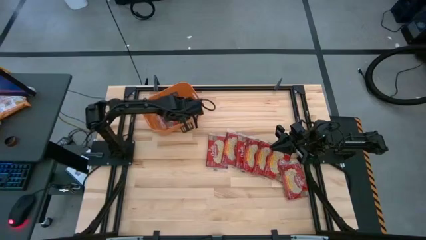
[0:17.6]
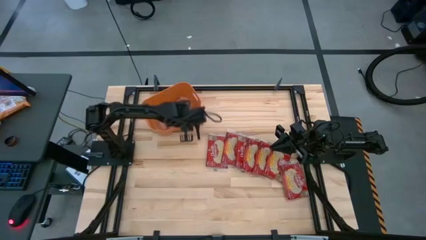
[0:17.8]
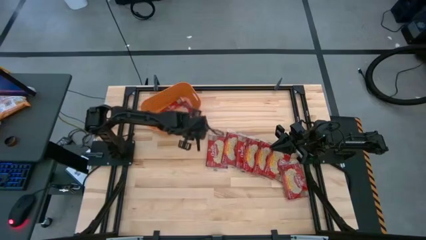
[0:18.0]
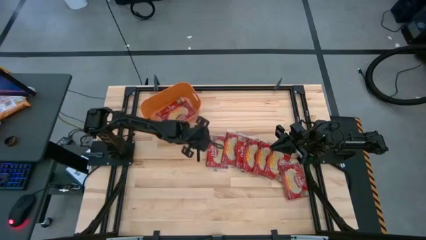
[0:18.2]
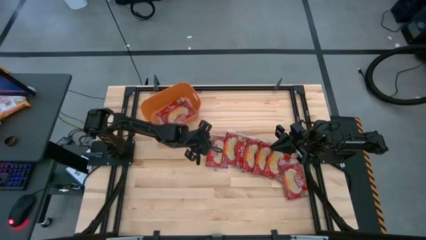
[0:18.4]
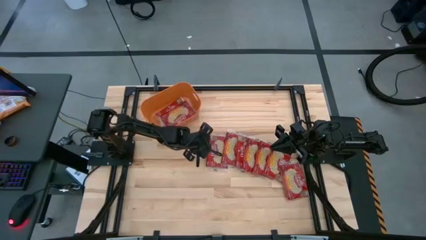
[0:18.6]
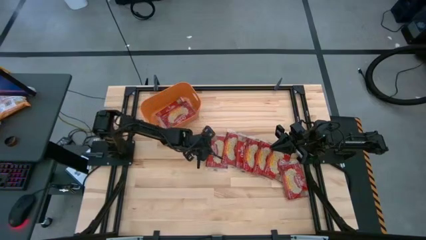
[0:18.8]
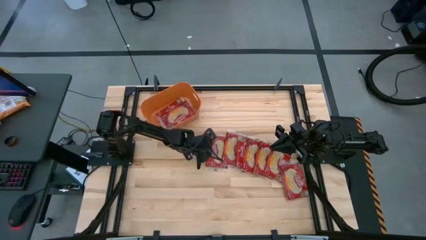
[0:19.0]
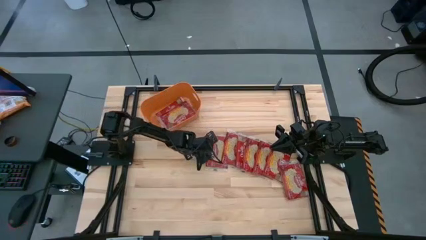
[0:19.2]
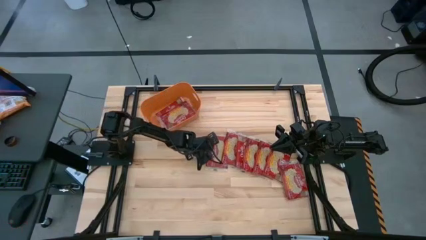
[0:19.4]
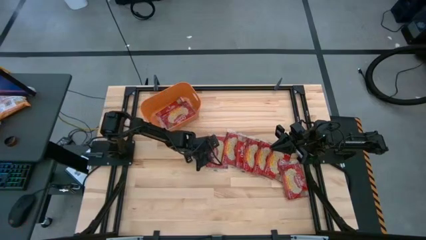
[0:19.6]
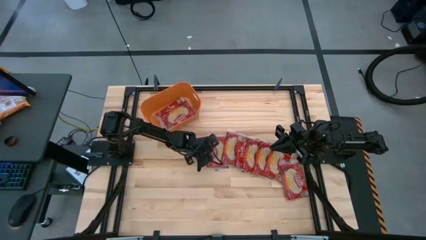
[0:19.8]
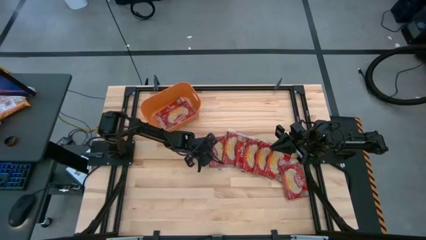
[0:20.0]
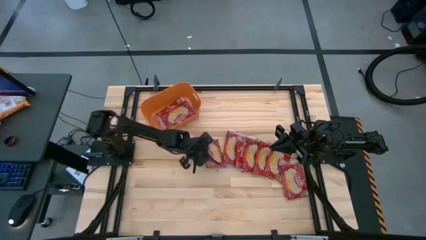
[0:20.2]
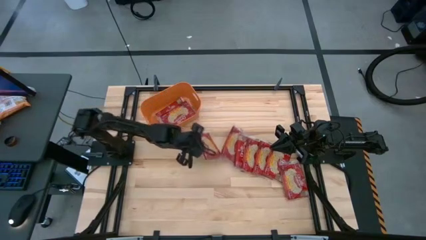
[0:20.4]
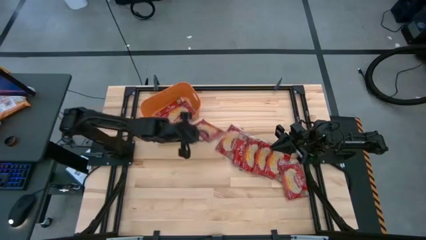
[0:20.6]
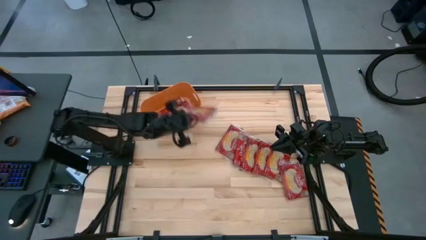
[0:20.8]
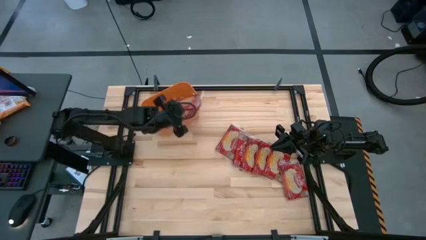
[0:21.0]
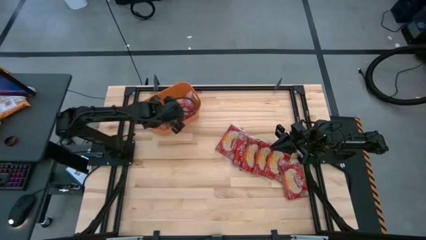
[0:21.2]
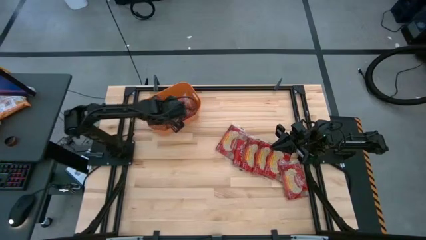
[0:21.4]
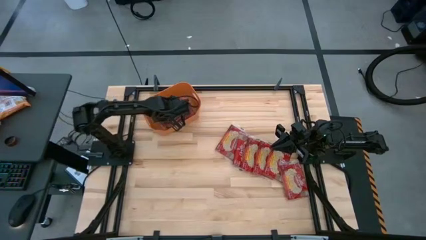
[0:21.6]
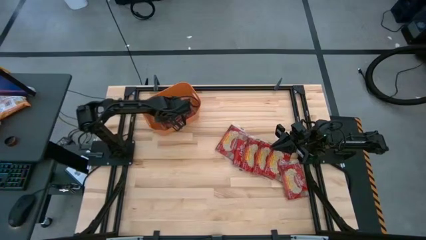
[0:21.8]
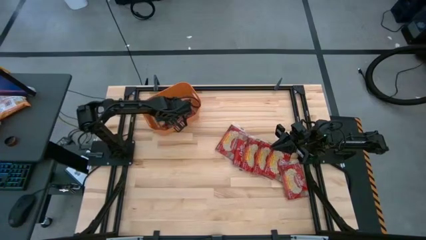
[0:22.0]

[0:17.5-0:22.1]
Task: Sort popcorn bags into baskets
Put the red popcorn pack into the orange bin

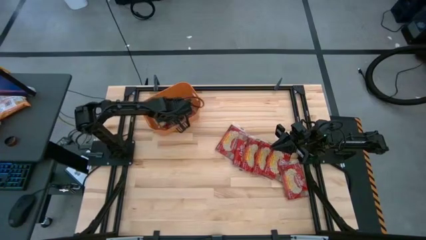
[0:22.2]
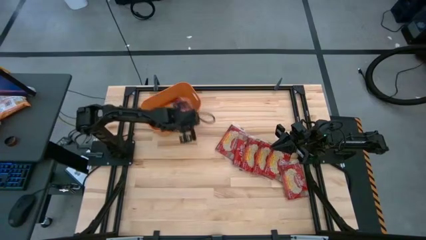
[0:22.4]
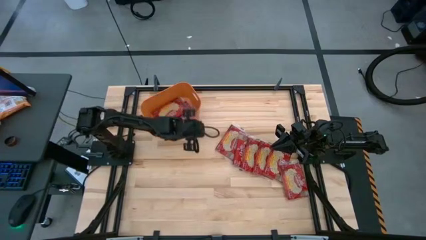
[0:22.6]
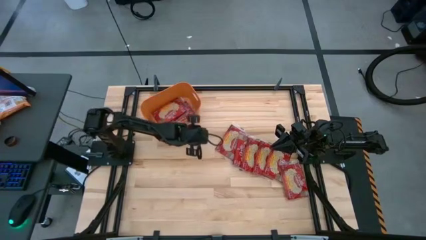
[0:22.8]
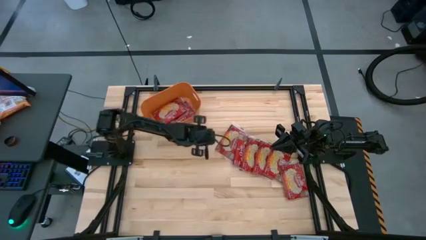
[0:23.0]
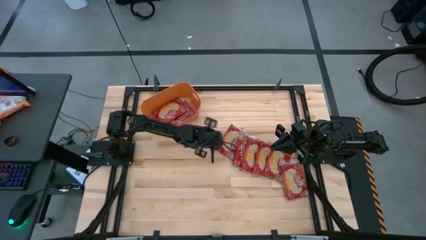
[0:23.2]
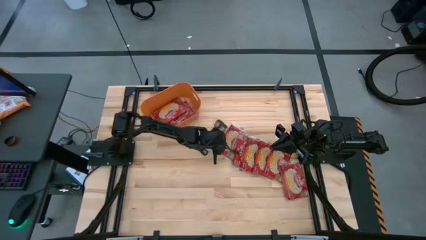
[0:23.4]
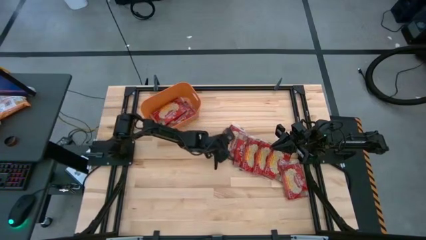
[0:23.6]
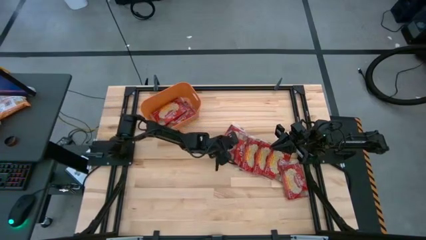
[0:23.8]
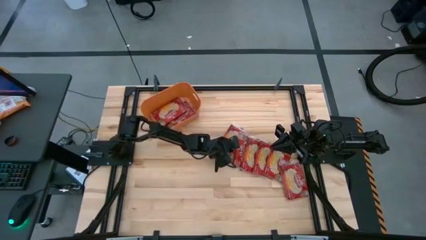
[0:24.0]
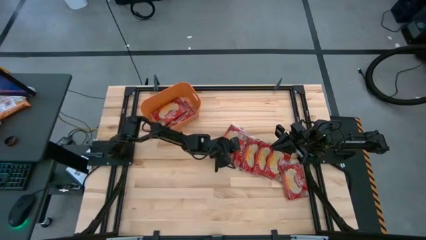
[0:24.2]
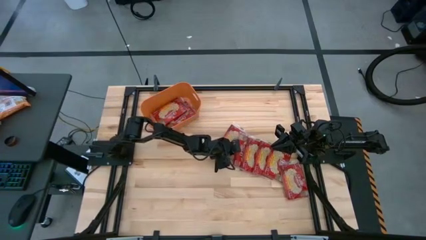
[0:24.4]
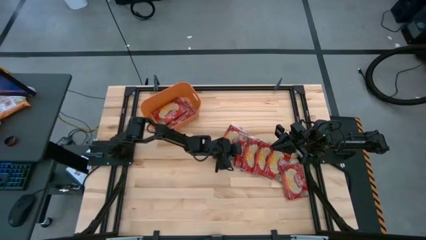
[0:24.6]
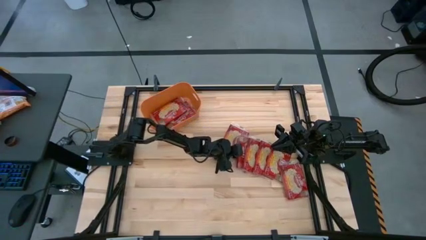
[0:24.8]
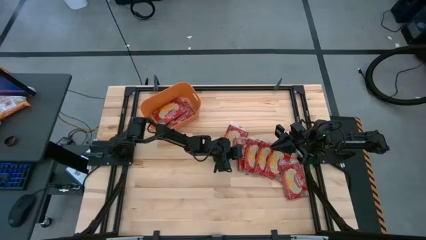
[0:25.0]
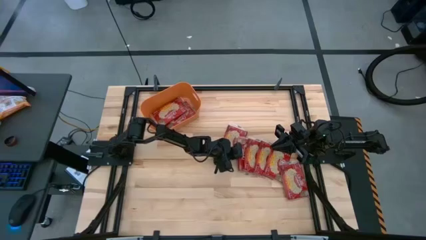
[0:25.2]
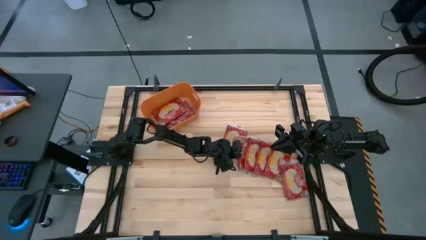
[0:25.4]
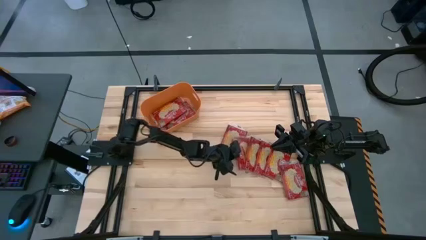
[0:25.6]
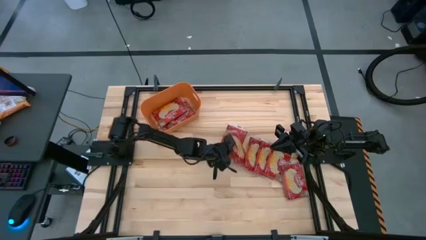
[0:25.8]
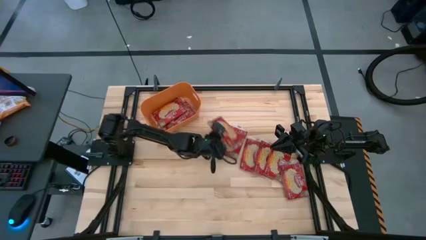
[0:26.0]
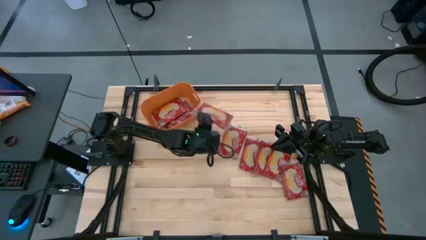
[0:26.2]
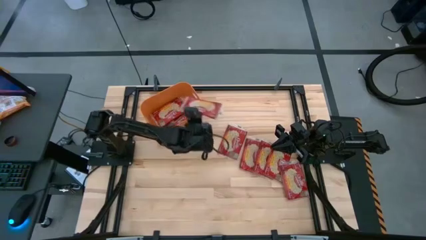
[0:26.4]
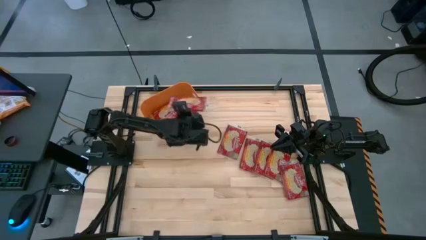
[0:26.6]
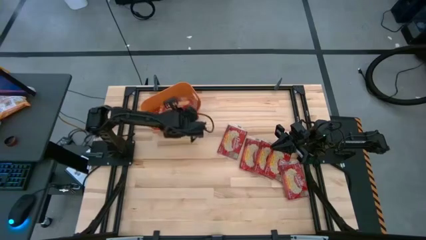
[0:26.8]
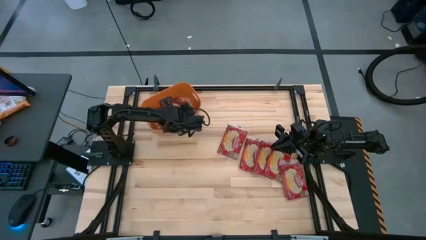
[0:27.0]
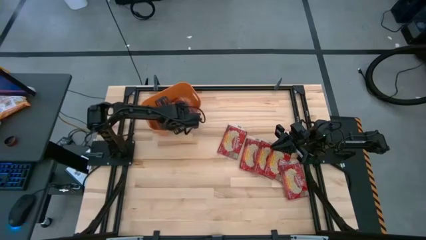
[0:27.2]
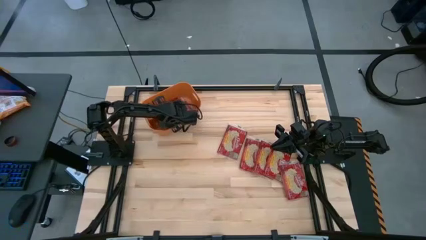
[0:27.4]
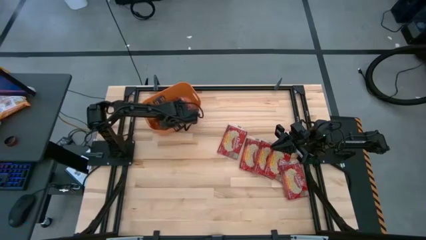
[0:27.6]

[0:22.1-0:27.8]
Put the red popcorn pack into the orange bin

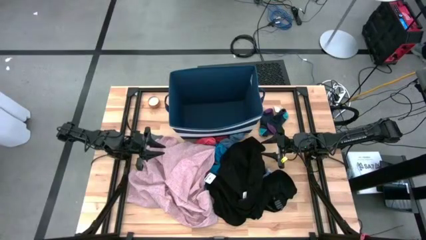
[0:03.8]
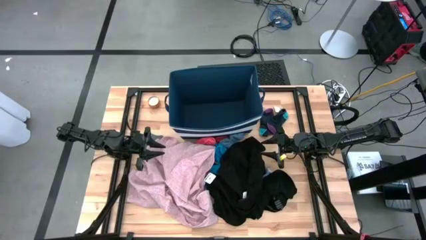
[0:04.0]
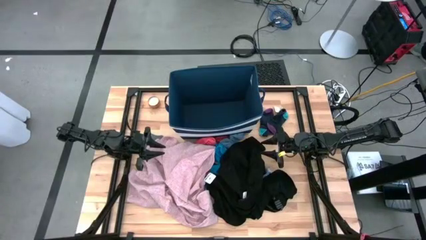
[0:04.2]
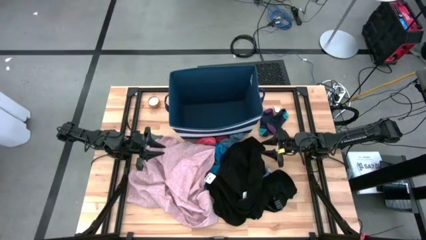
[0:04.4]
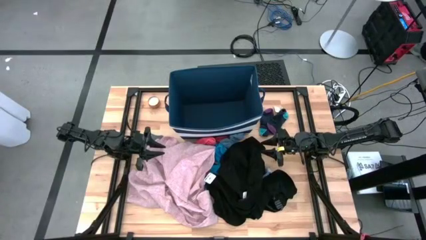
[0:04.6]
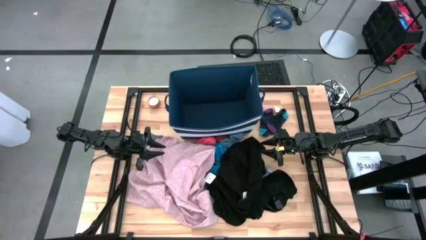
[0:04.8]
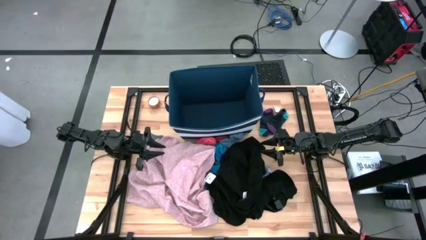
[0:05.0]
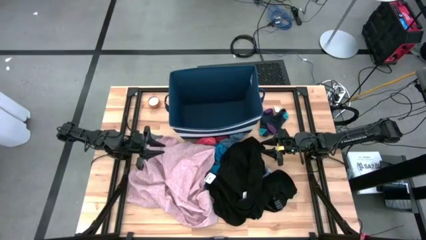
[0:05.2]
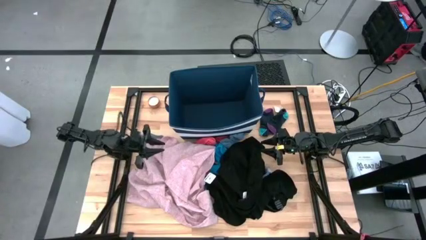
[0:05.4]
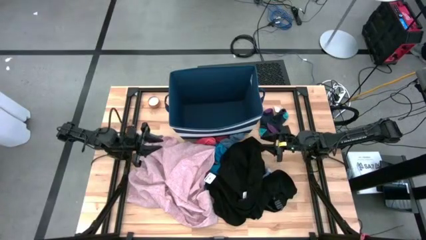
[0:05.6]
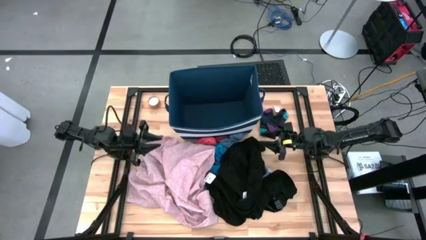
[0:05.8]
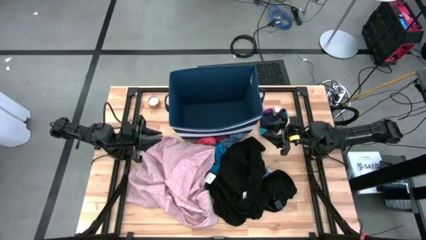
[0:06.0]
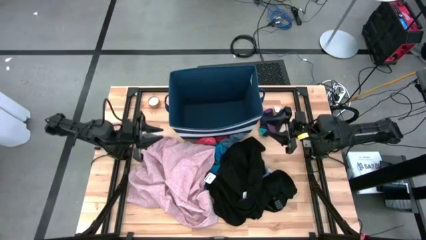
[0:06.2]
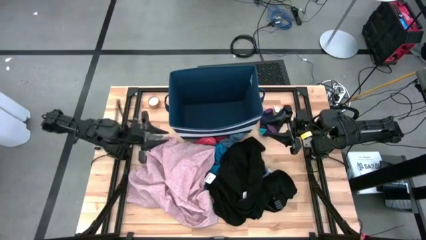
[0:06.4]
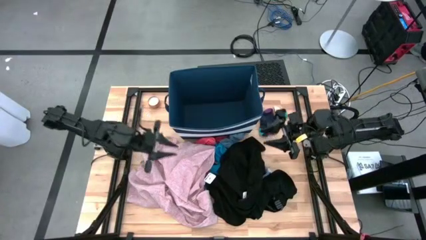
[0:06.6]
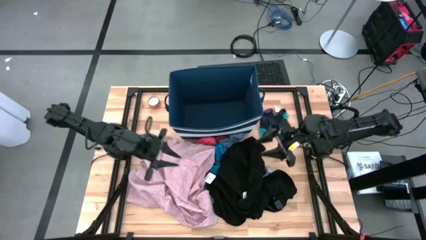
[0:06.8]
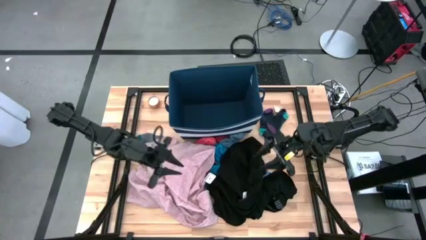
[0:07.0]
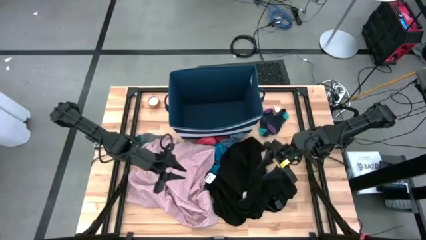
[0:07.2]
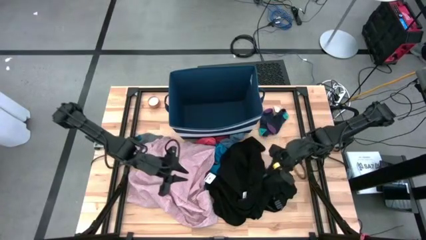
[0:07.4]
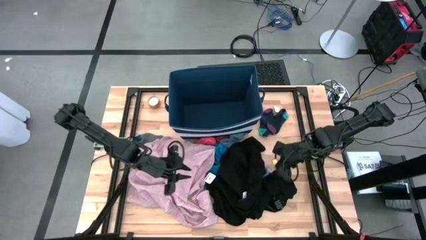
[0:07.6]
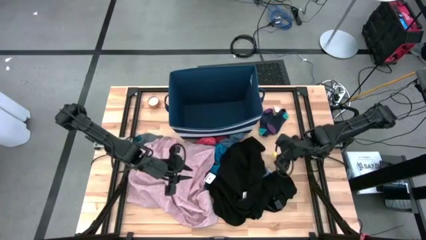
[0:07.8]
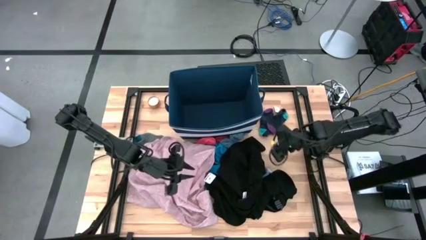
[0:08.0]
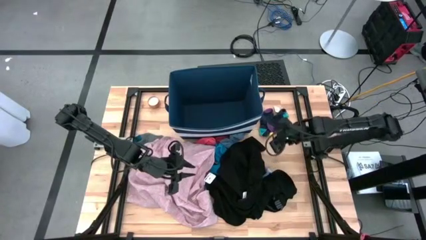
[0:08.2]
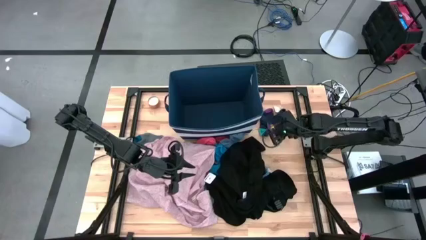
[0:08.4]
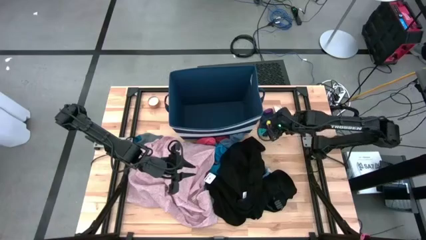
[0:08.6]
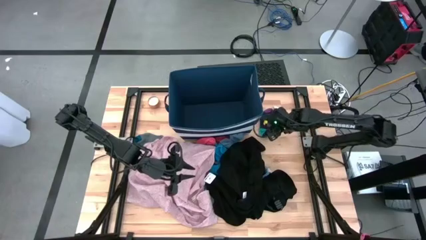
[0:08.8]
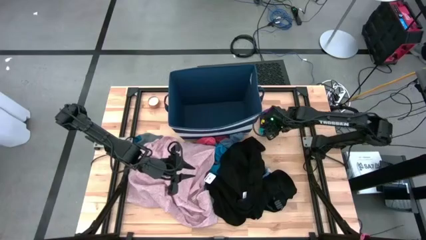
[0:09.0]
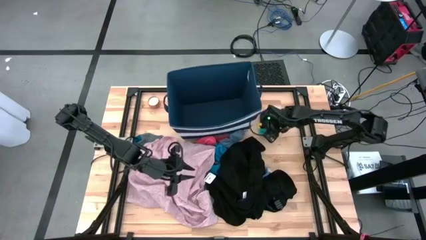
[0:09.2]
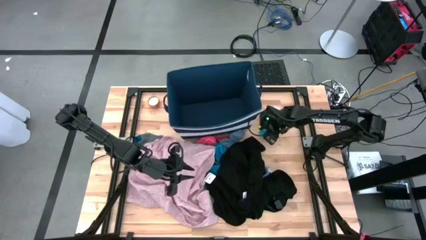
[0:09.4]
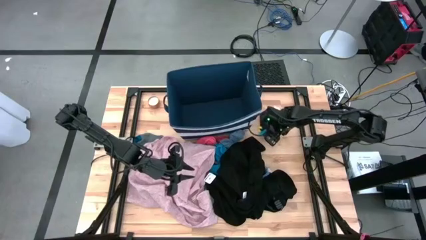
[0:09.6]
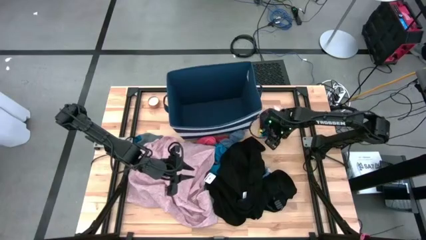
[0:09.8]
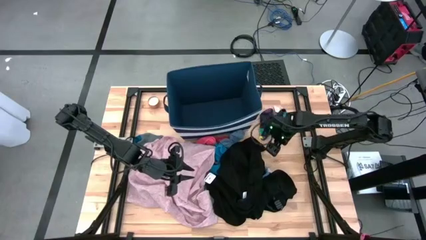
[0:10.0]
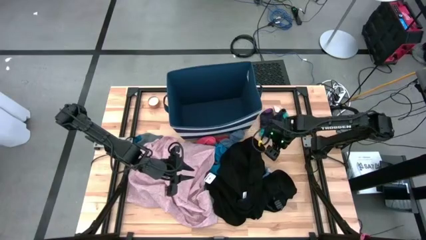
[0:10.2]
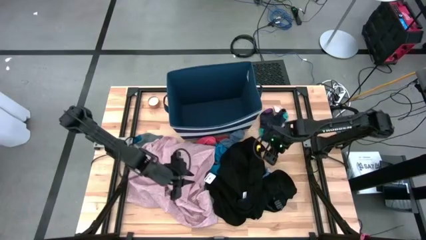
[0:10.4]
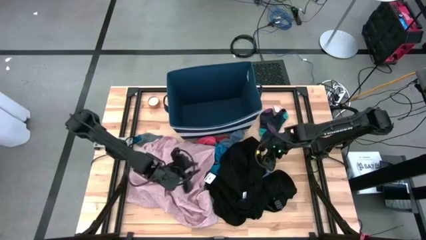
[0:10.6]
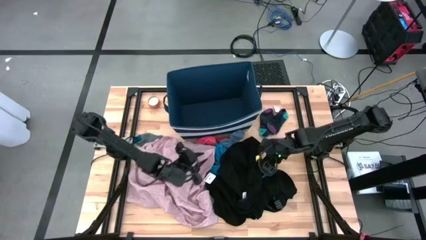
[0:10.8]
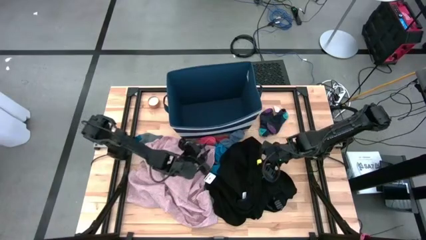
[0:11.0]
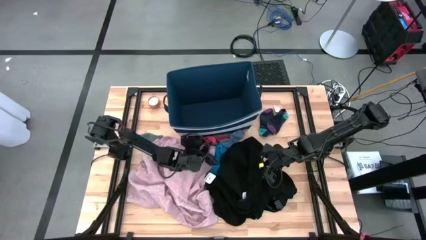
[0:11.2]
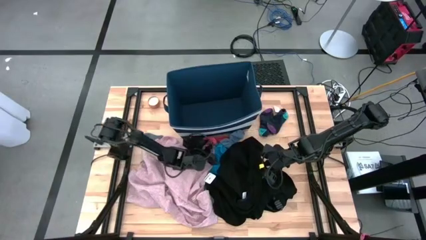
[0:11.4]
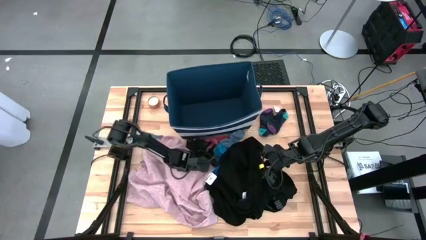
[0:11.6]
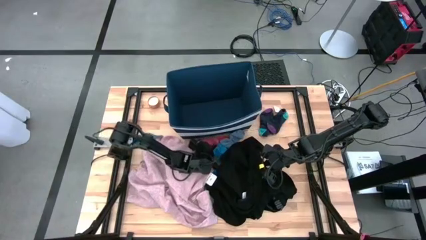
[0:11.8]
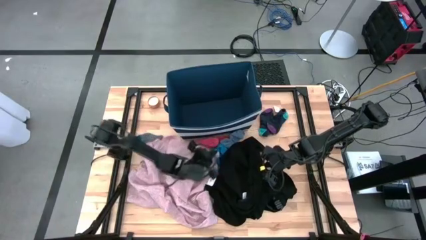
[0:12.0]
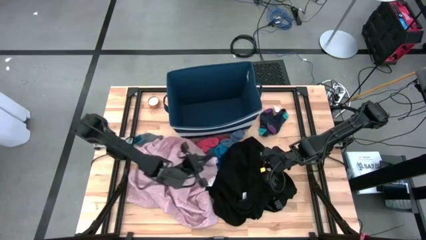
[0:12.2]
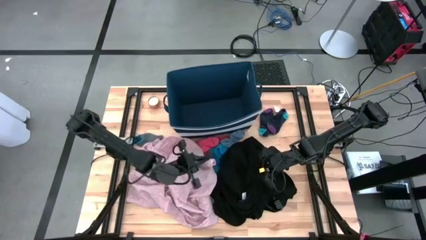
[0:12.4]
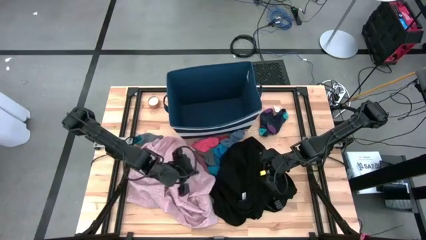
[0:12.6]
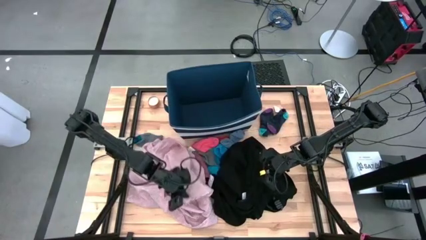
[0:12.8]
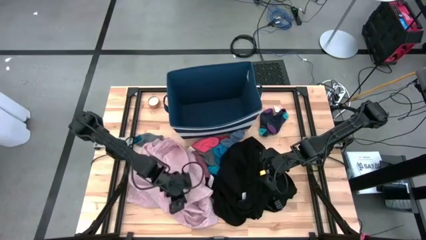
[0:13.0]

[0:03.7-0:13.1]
Task: Sort clothes
Put the pink sock into the blue laundry bin
